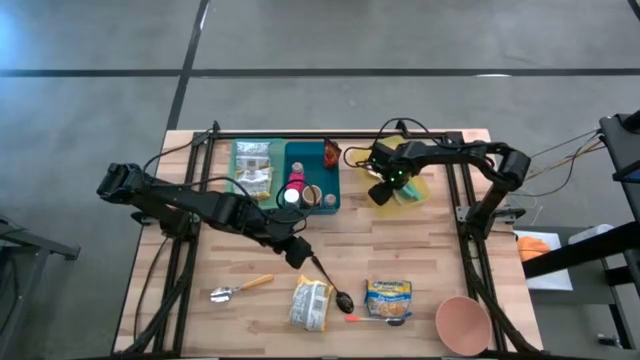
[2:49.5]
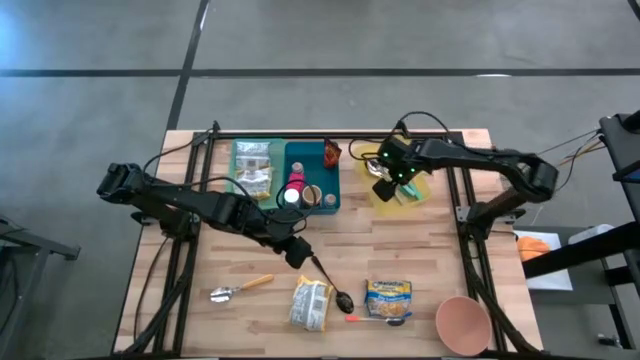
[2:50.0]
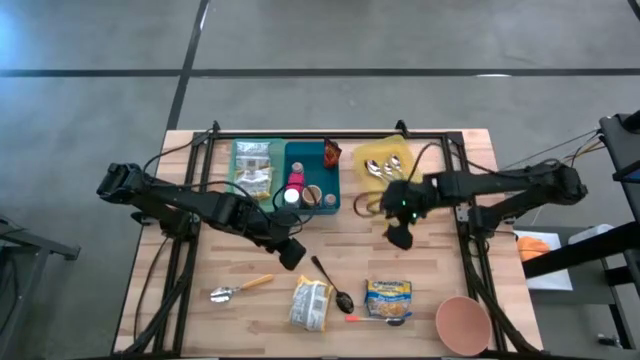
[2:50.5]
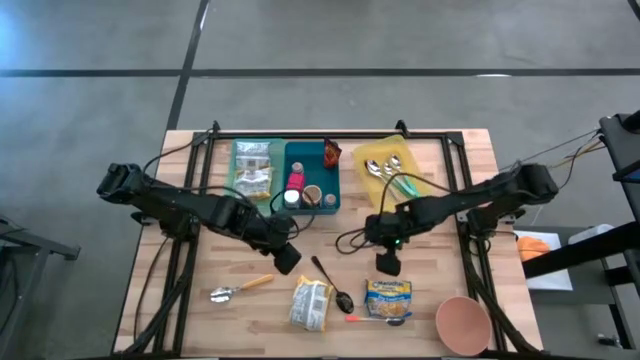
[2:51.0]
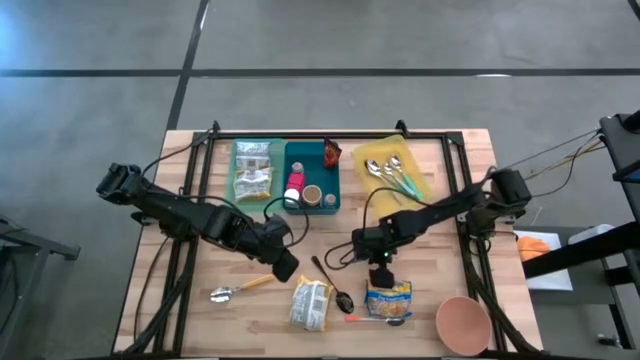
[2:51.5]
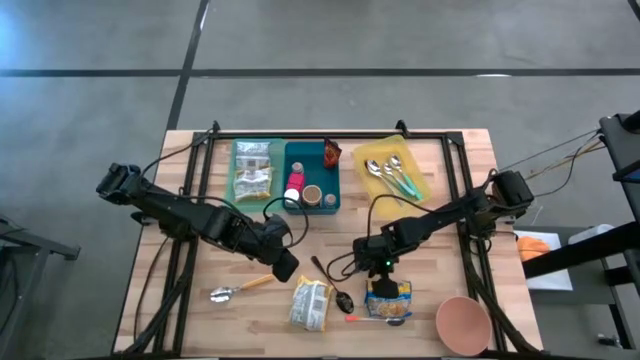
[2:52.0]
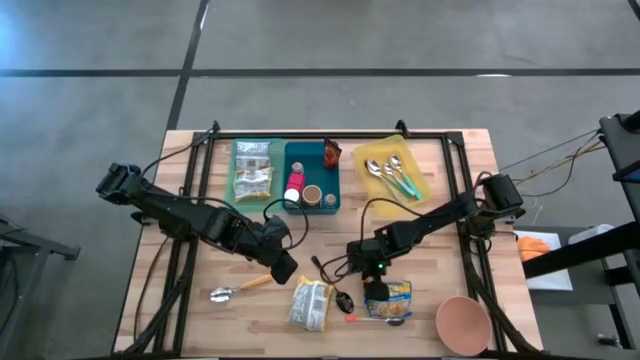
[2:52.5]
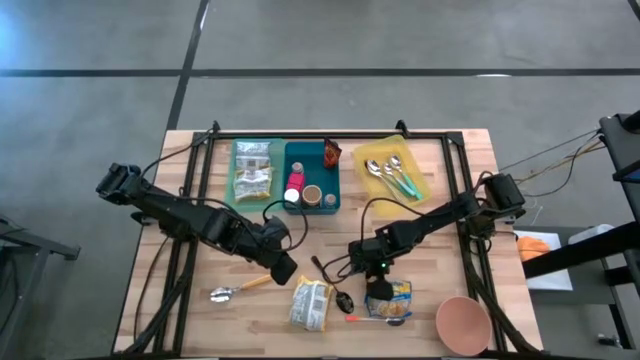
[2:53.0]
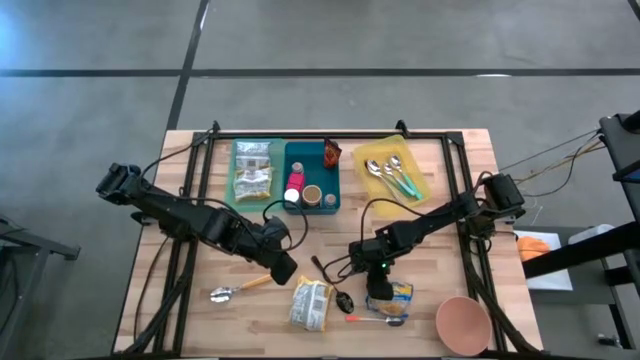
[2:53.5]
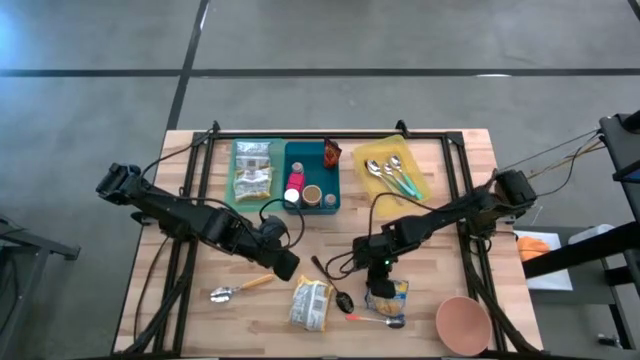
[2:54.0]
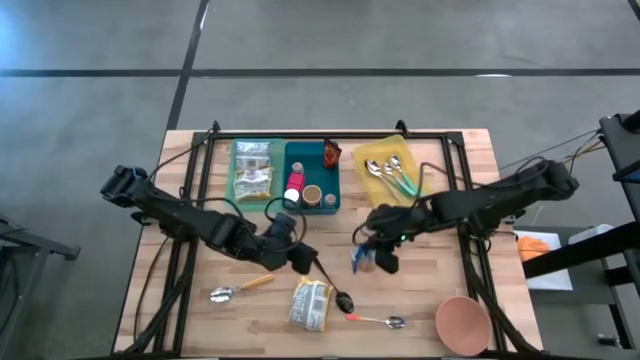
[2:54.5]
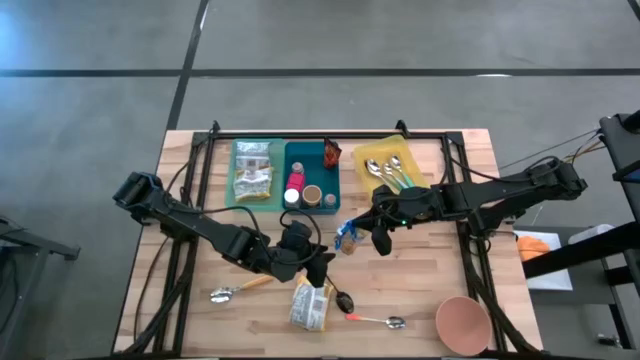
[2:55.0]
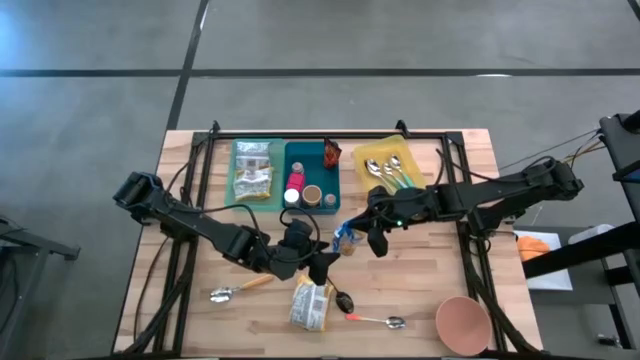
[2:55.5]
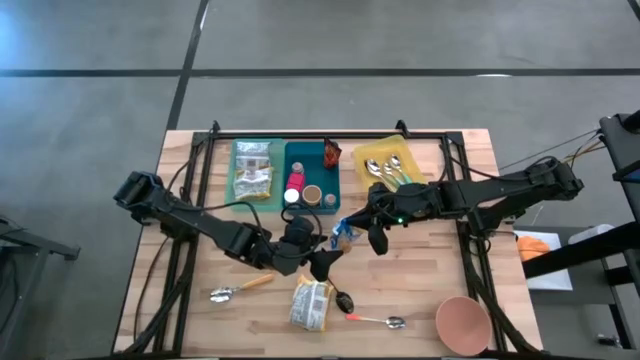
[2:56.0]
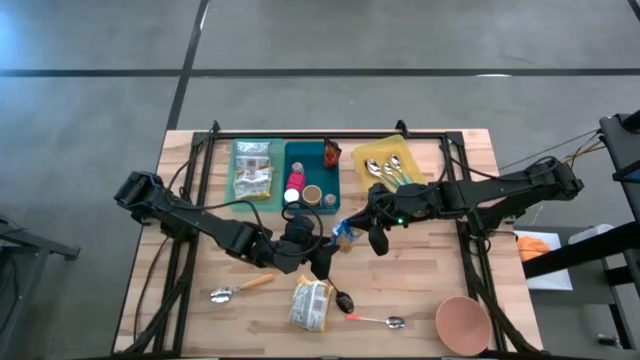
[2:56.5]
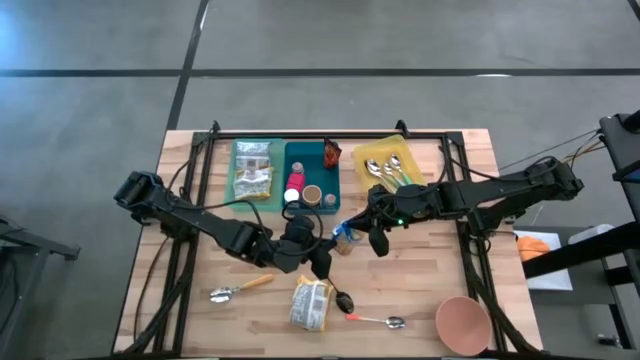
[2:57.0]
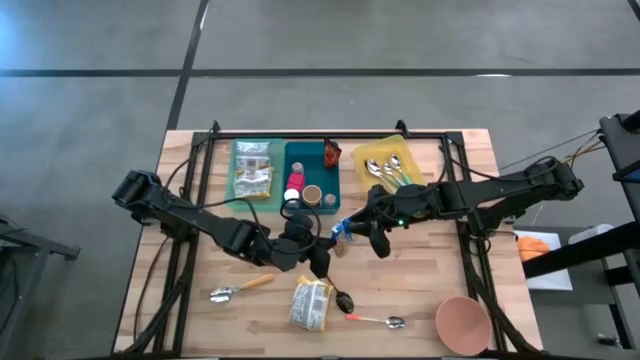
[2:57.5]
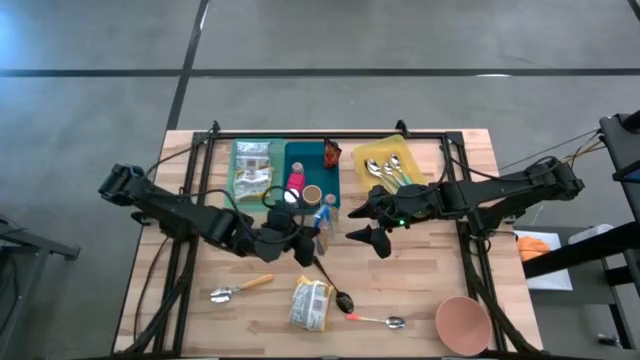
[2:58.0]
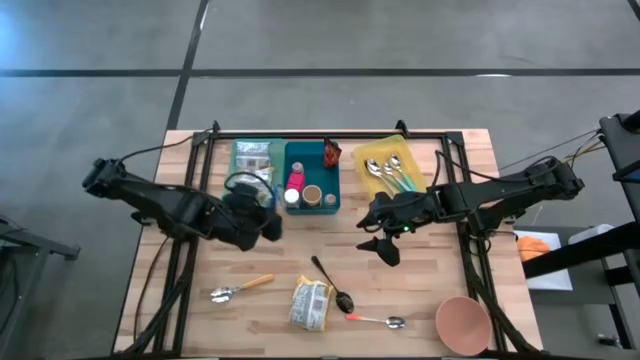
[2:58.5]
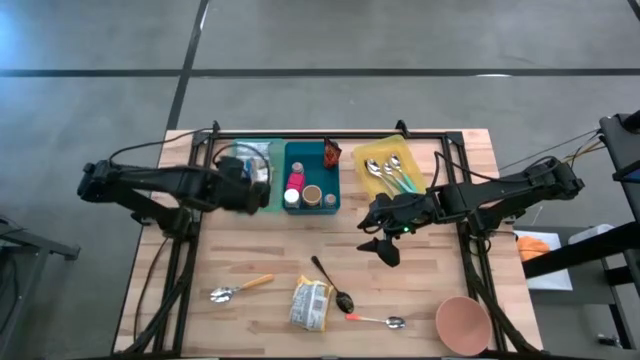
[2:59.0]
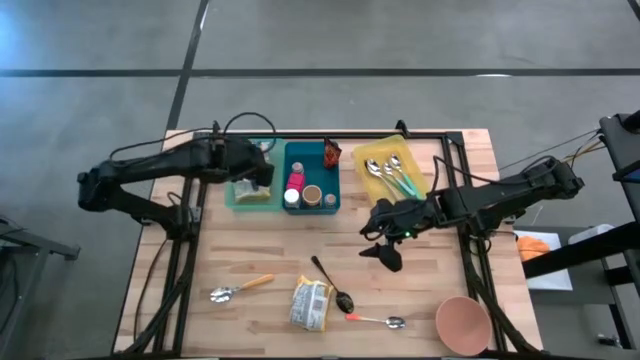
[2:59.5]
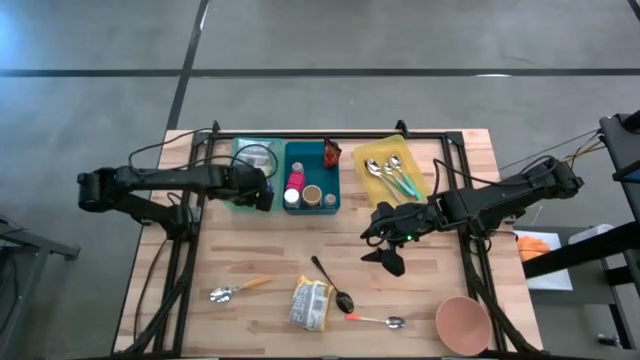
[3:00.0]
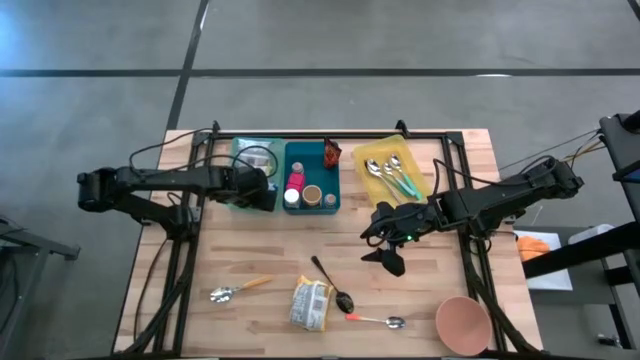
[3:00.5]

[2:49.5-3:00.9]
Put the blue noodle pack into the green bin

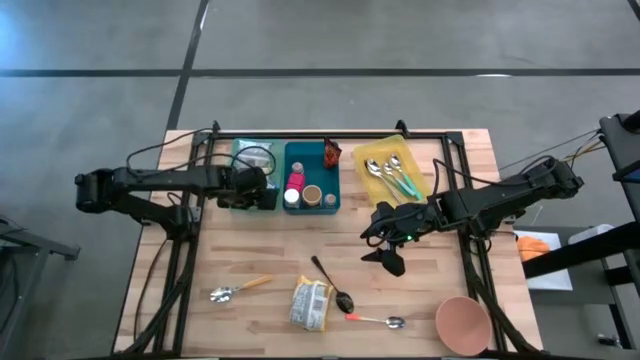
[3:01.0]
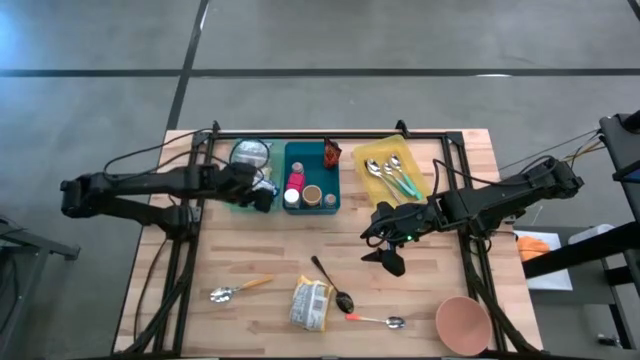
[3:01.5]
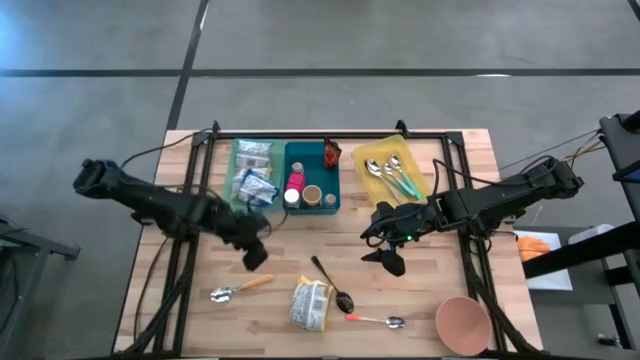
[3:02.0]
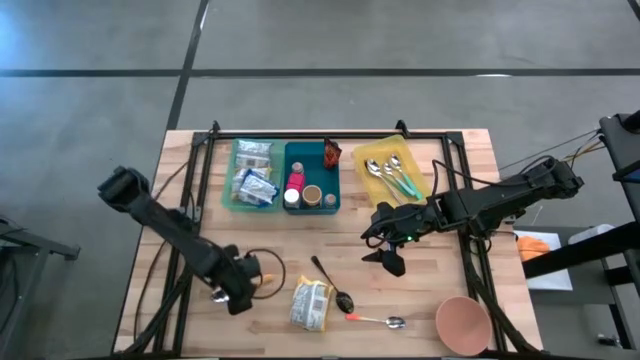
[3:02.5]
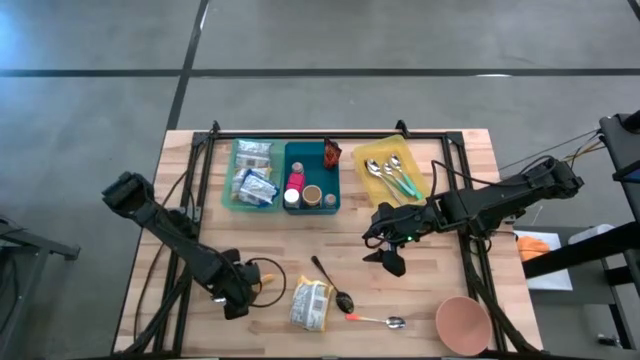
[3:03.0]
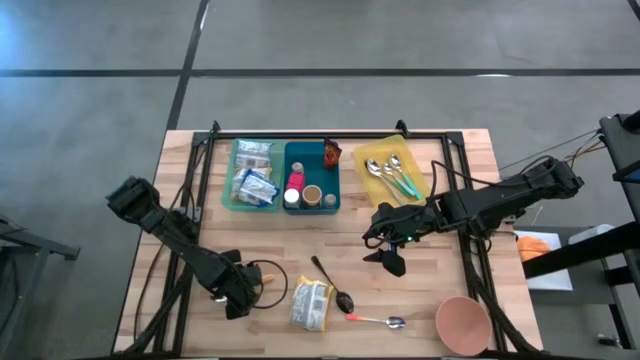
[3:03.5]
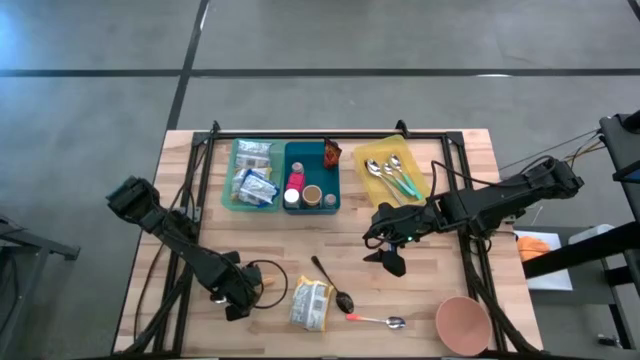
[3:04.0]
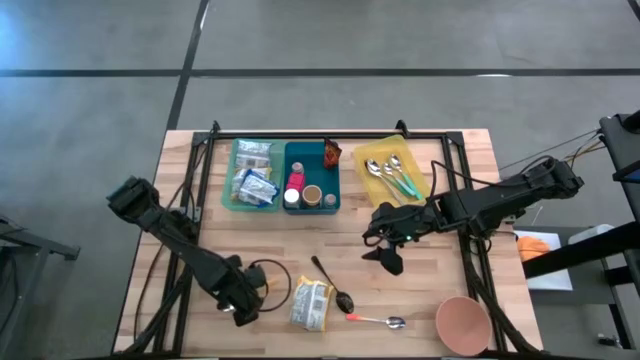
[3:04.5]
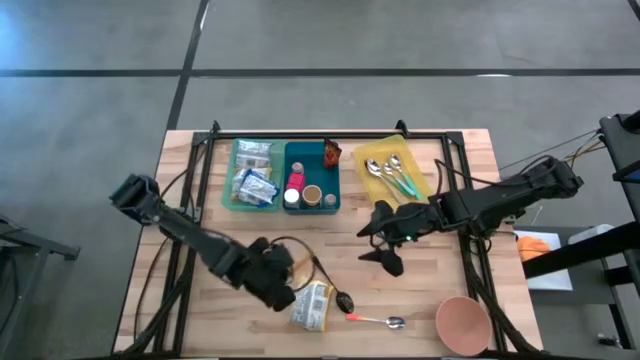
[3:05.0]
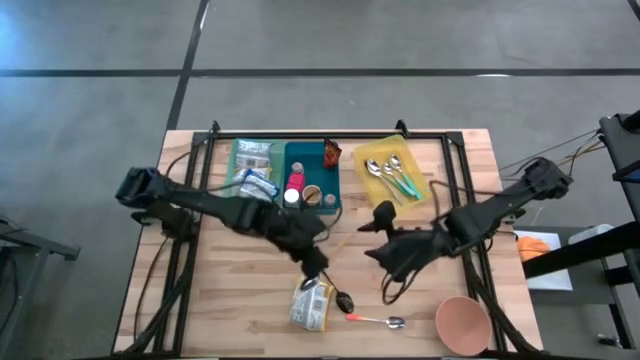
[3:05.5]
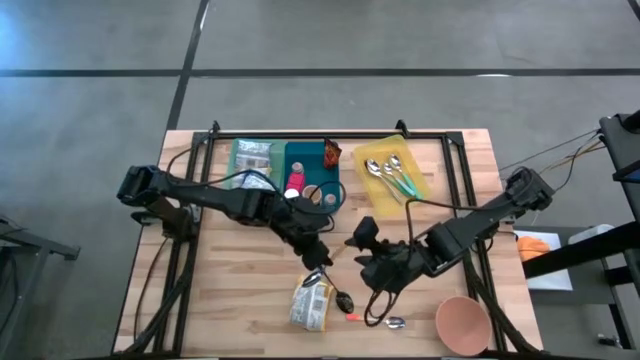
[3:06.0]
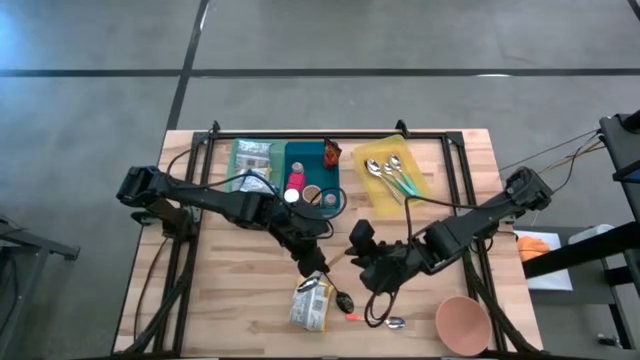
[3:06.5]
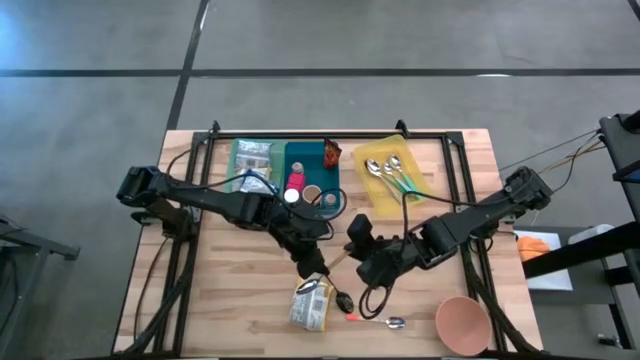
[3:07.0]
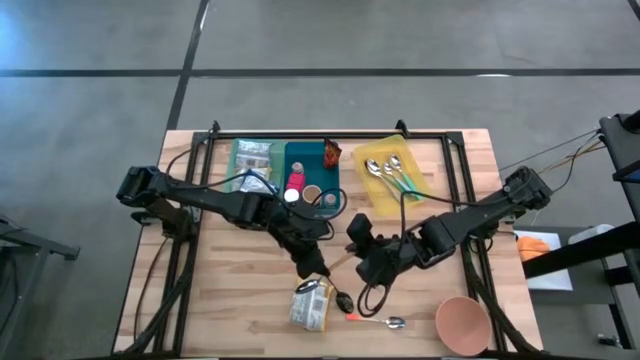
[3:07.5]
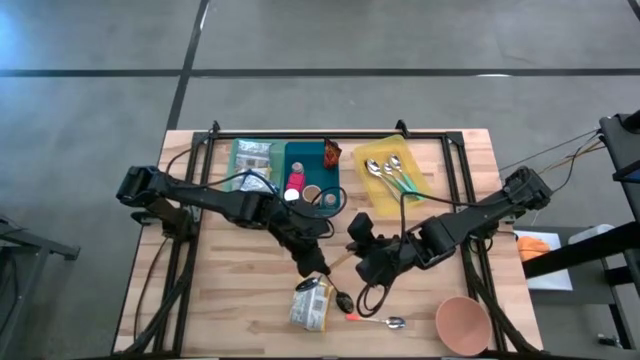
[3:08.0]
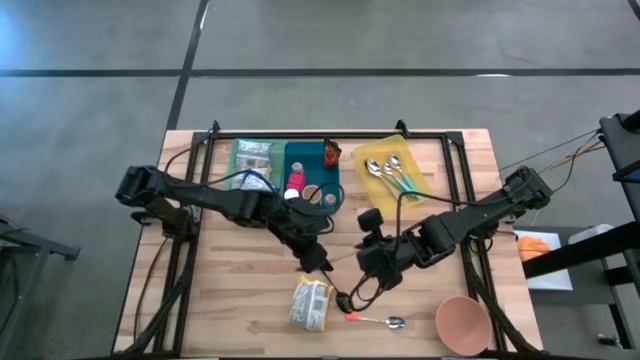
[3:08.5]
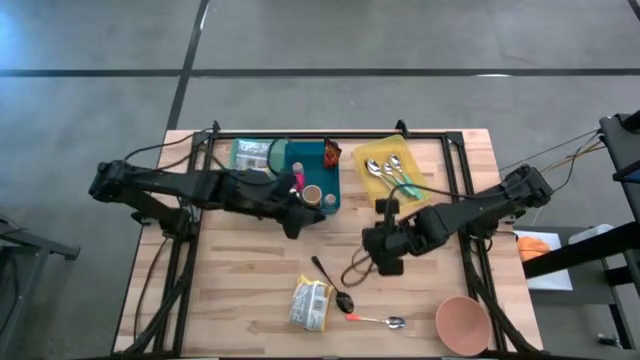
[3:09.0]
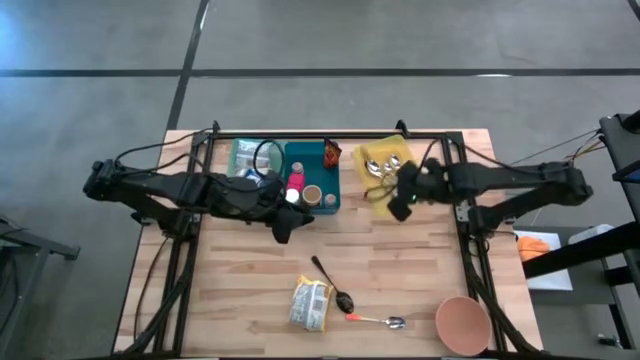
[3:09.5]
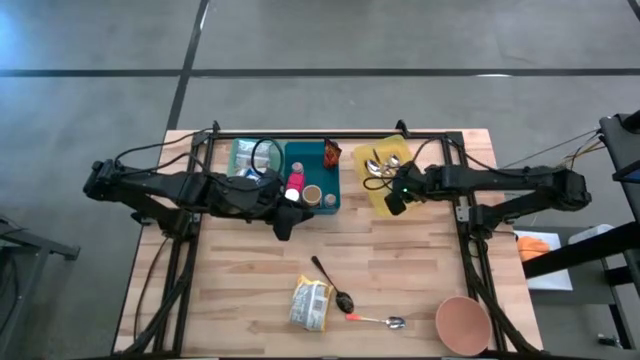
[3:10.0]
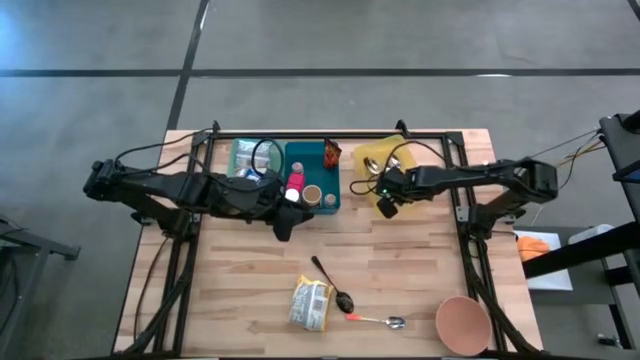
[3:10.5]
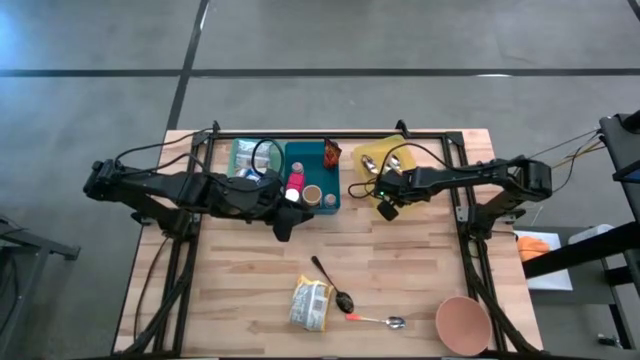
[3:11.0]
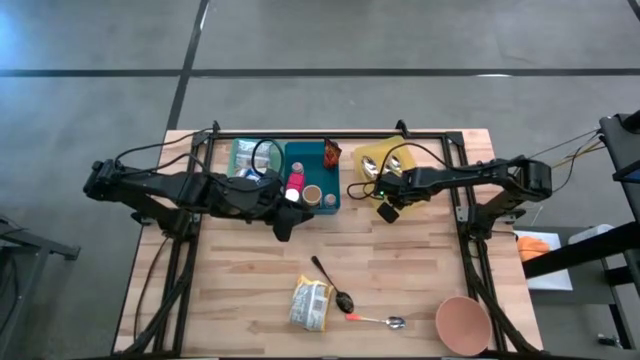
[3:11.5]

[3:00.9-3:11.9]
Put the yellow spoon into the yellow bin
